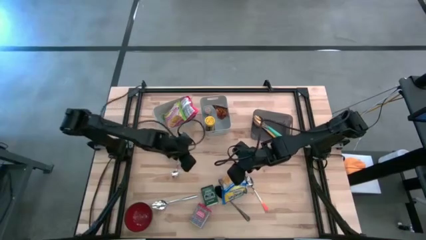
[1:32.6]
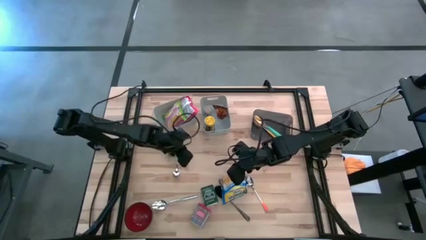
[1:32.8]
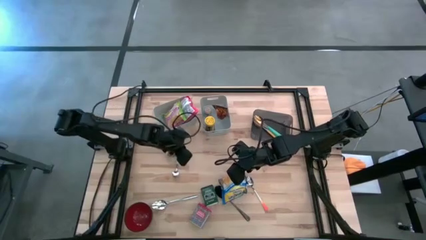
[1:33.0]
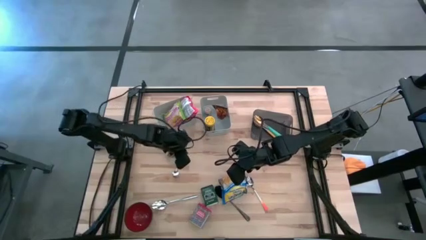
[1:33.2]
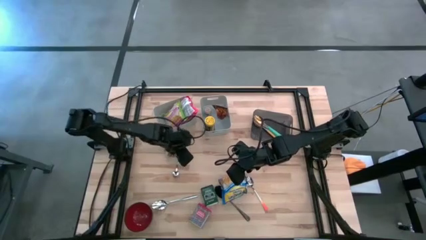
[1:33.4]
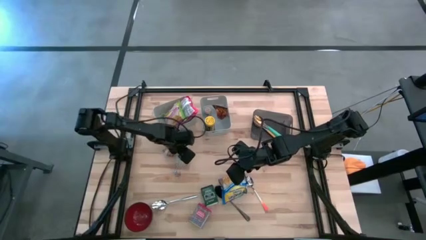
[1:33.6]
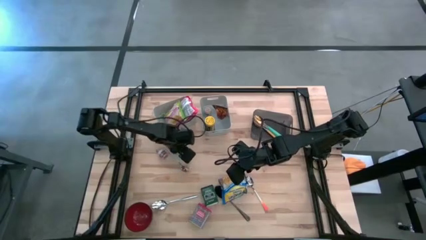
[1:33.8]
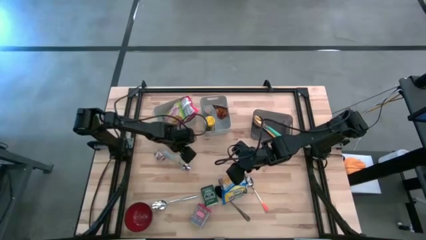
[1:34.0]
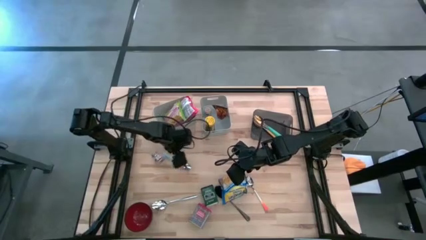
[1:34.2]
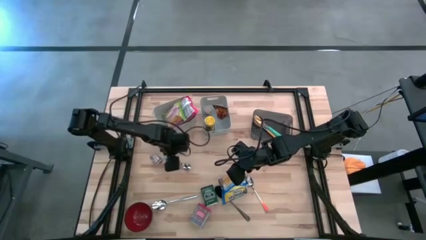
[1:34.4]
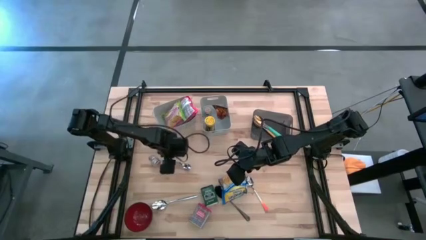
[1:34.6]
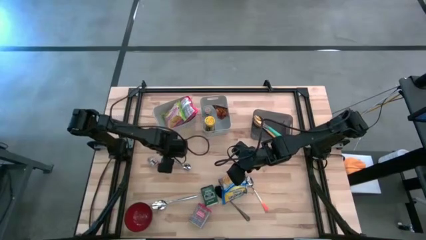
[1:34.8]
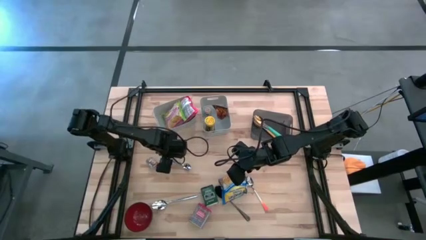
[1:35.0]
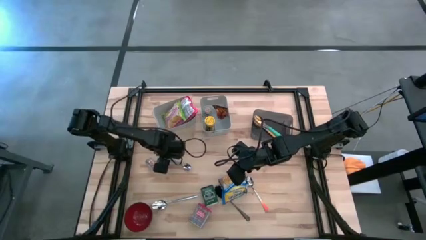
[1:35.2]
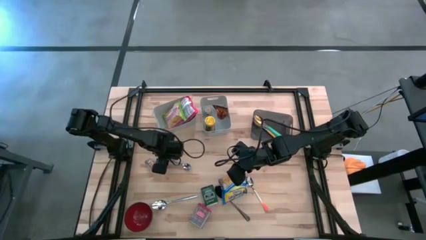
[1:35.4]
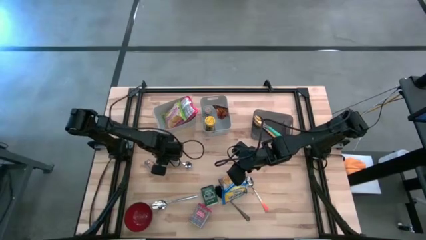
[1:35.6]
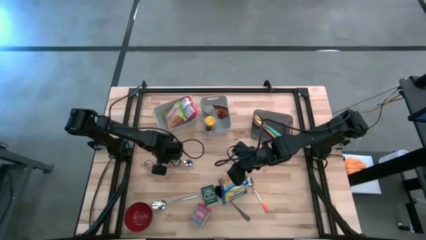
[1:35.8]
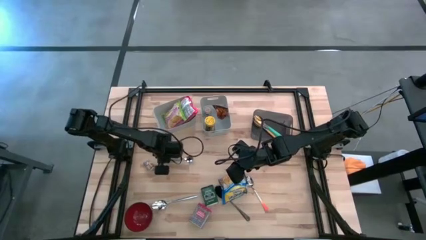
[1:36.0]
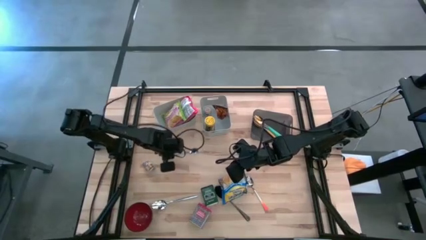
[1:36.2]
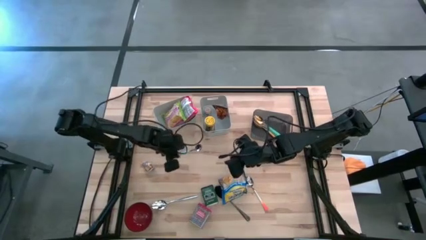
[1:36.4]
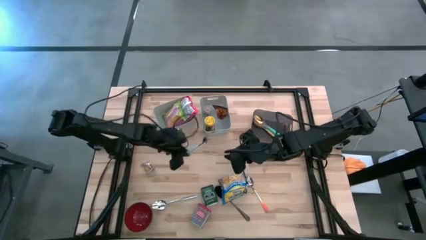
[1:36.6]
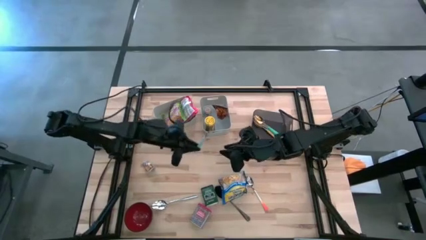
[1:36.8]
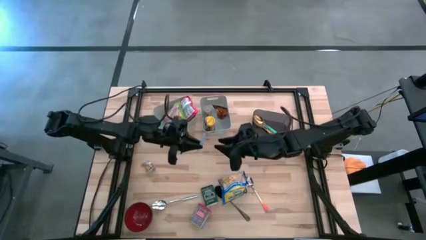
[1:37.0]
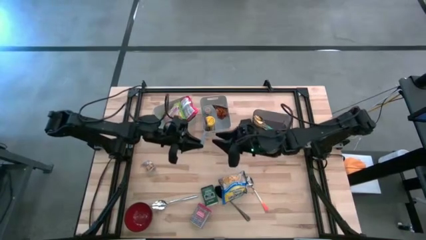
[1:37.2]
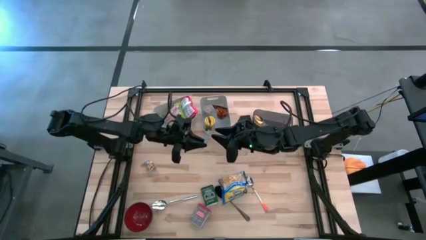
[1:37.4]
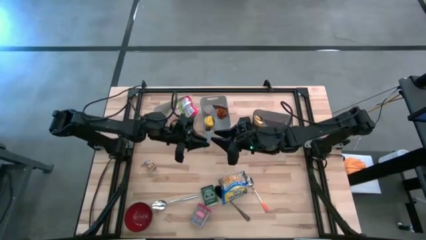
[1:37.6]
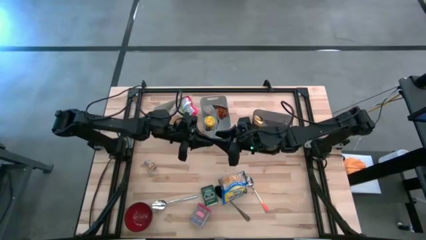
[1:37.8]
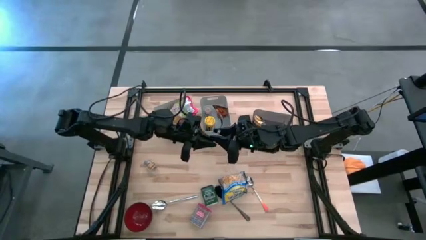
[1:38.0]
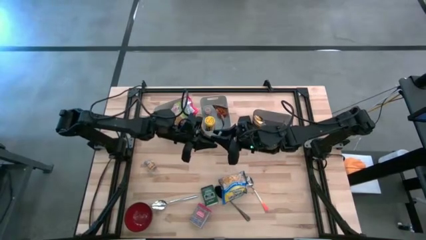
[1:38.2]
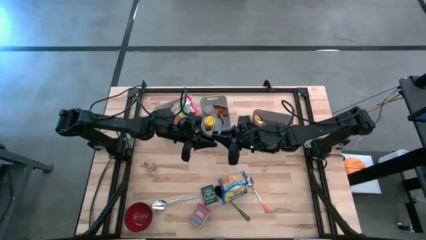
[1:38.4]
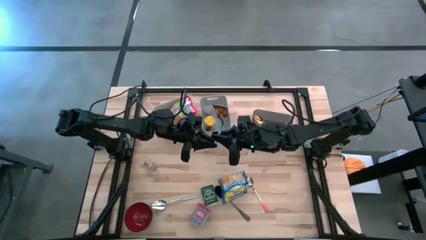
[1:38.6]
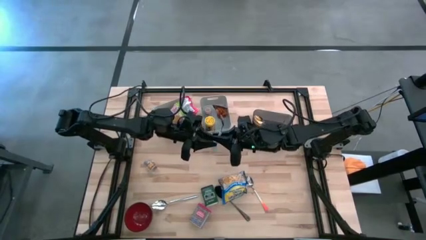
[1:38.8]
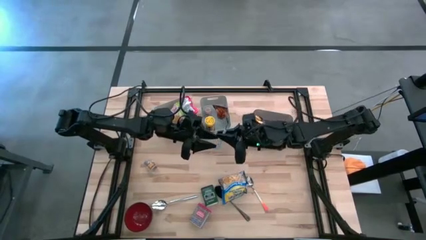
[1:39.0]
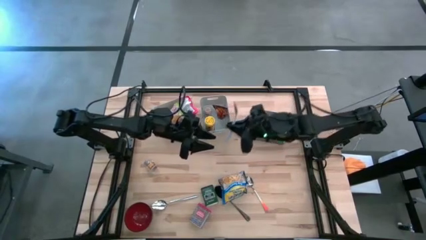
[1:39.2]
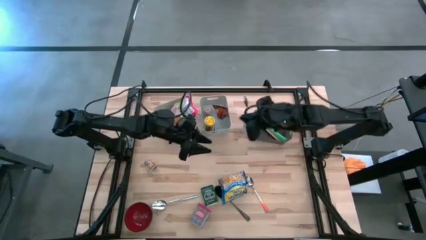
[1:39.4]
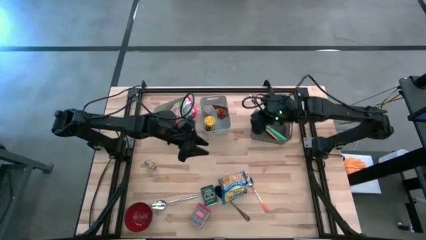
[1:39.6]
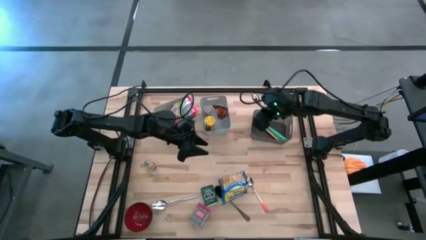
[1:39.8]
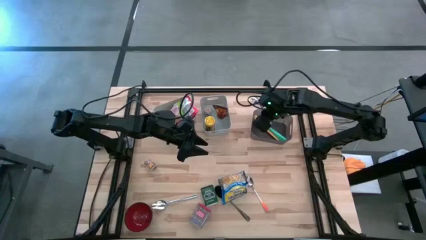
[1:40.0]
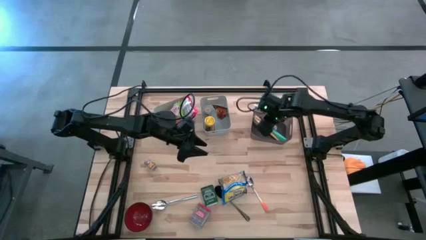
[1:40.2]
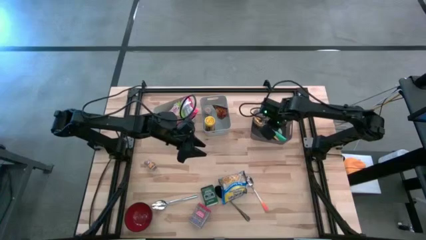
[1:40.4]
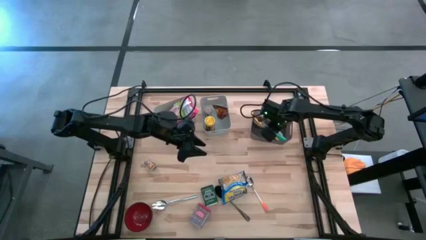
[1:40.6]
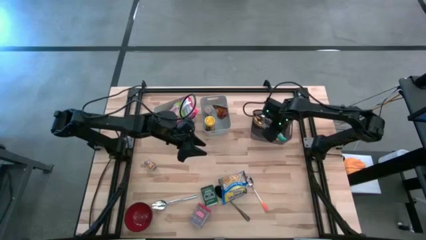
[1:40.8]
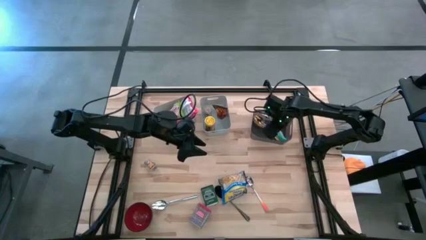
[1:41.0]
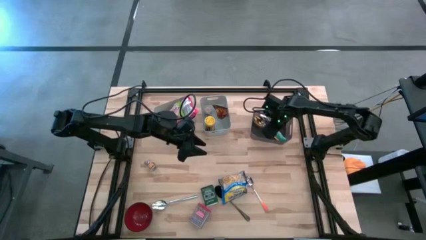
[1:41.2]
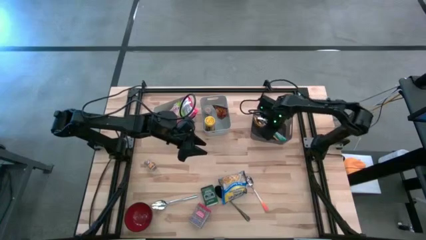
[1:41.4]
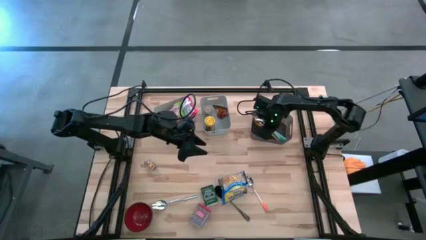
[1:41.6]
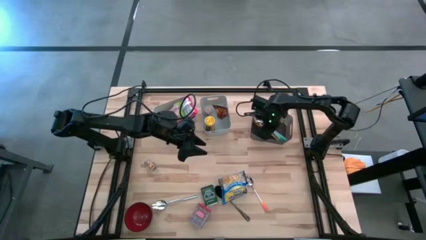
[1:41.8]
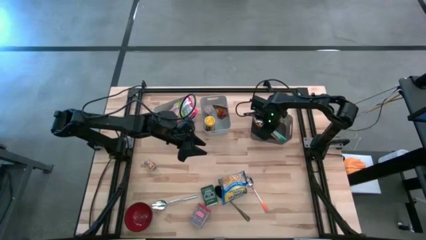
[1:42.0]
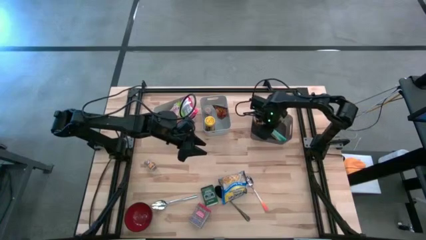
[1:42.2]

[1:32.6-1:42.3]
Put the light blue spoon into the black bin
